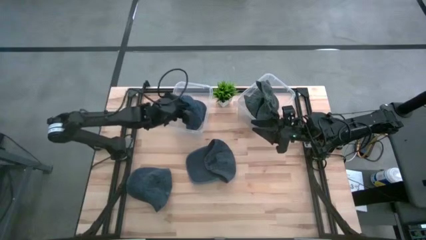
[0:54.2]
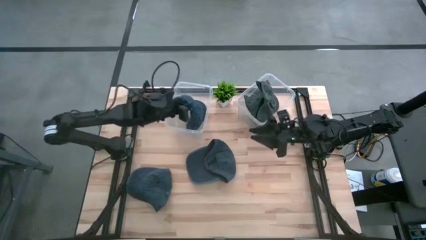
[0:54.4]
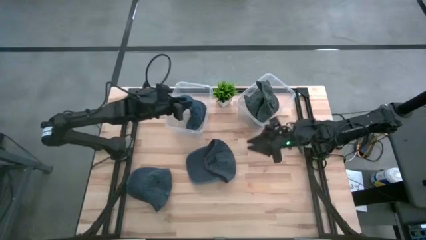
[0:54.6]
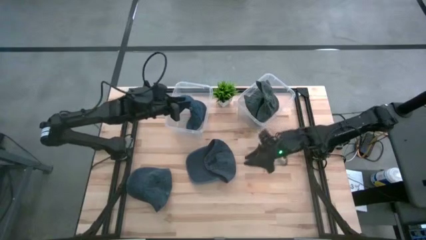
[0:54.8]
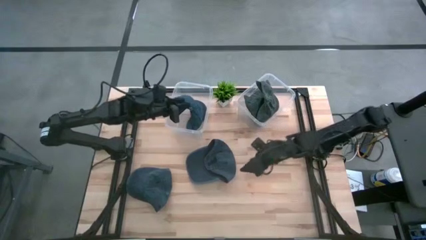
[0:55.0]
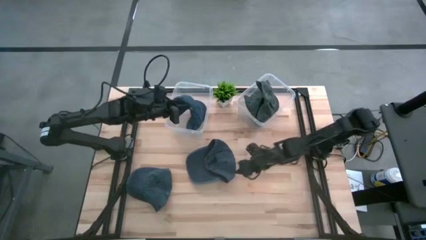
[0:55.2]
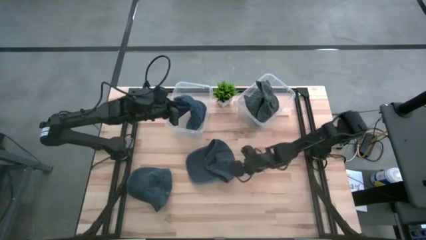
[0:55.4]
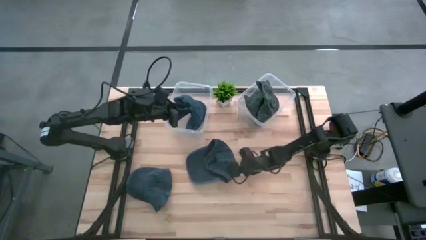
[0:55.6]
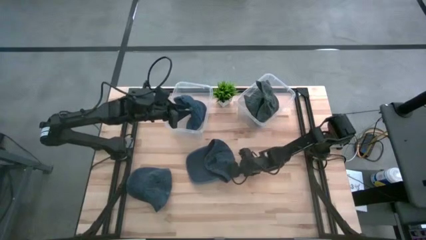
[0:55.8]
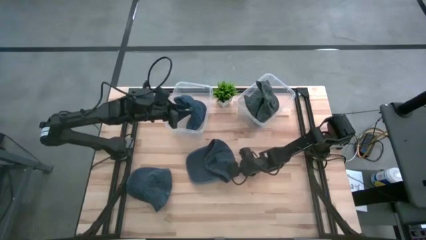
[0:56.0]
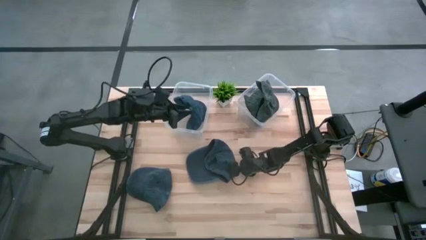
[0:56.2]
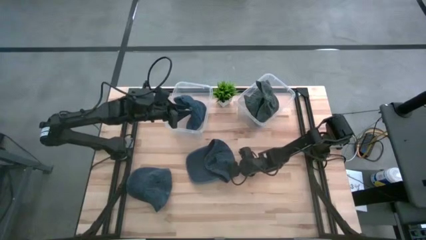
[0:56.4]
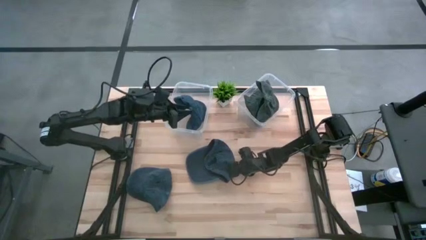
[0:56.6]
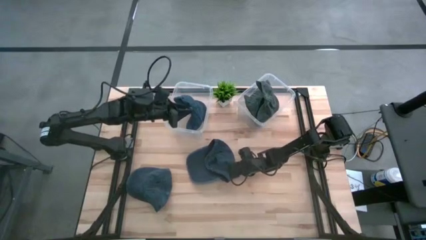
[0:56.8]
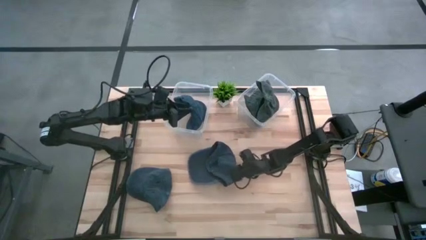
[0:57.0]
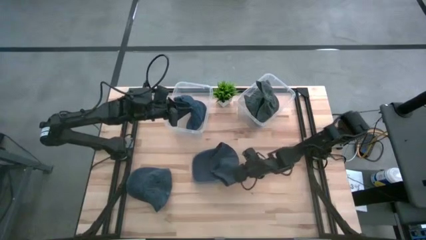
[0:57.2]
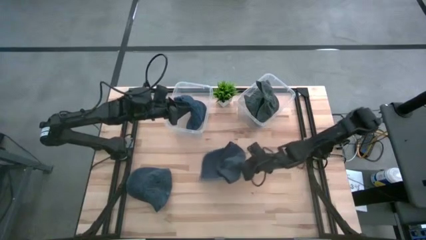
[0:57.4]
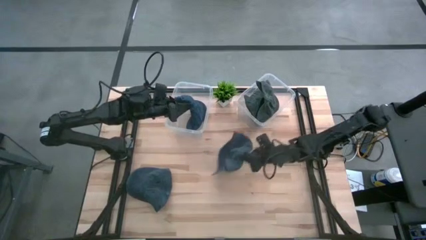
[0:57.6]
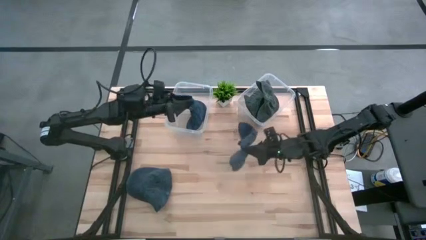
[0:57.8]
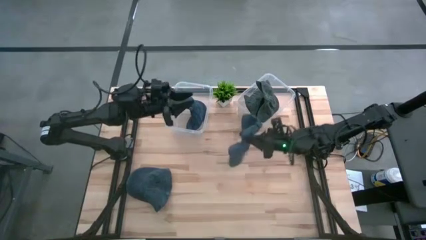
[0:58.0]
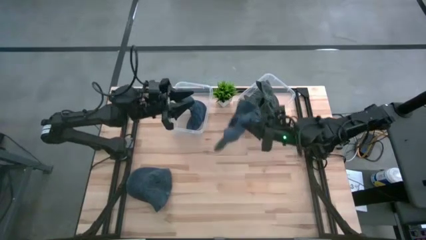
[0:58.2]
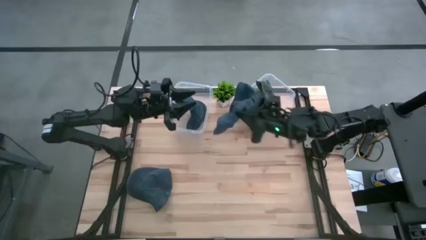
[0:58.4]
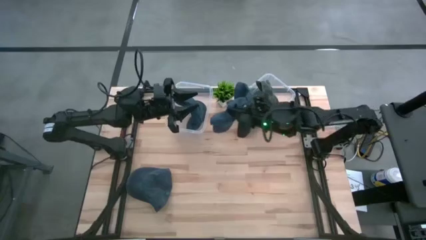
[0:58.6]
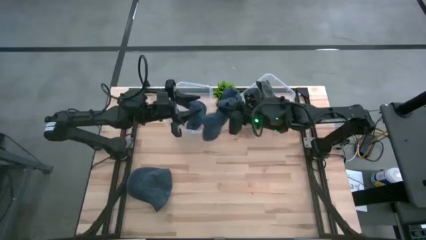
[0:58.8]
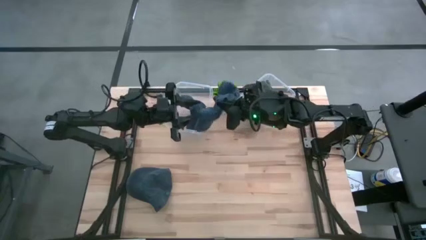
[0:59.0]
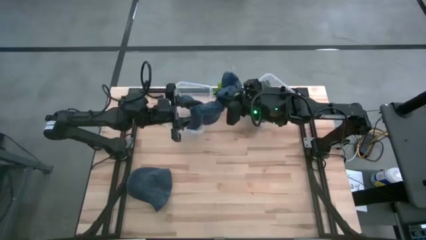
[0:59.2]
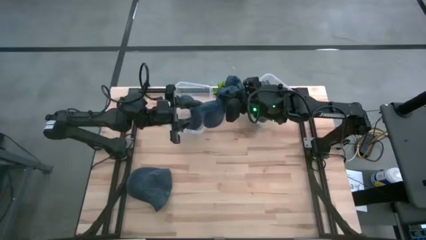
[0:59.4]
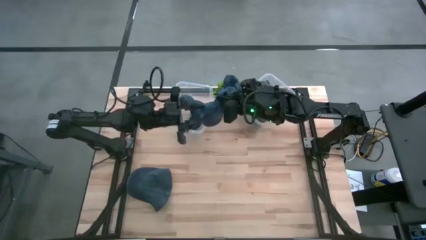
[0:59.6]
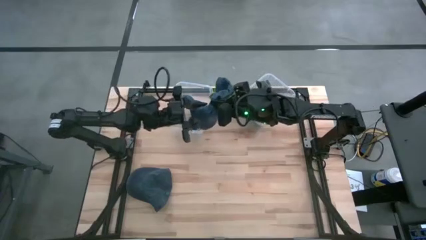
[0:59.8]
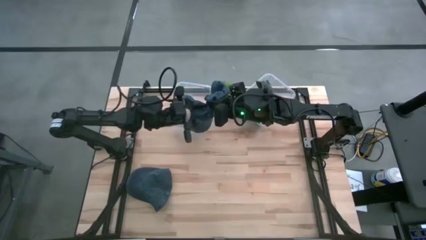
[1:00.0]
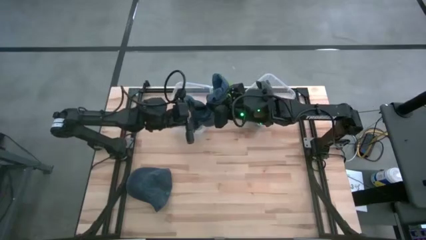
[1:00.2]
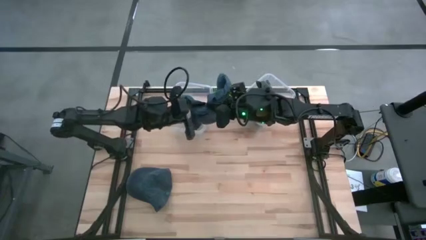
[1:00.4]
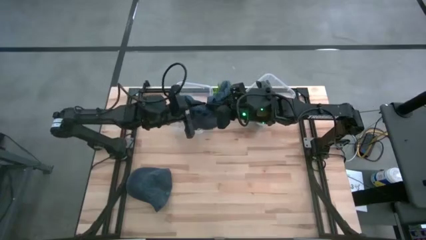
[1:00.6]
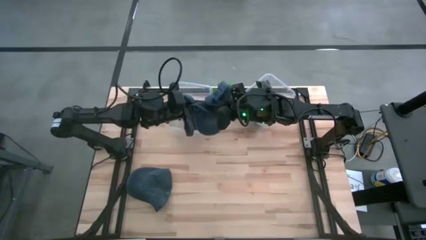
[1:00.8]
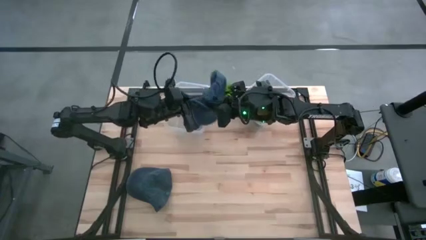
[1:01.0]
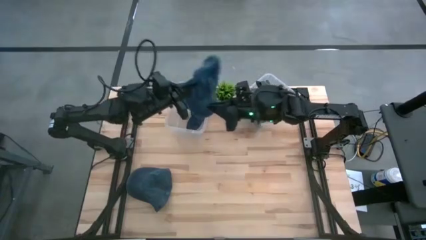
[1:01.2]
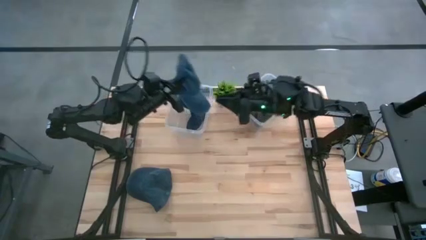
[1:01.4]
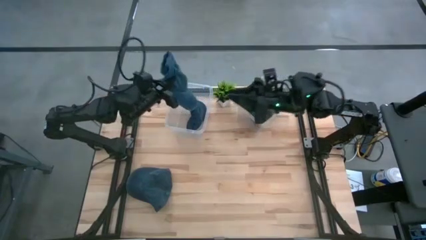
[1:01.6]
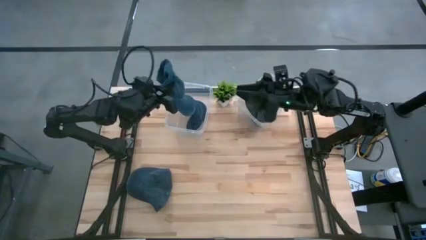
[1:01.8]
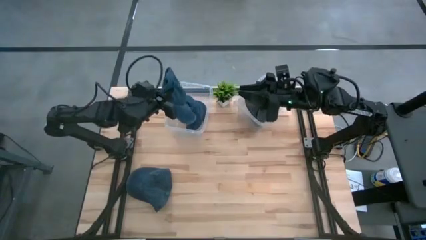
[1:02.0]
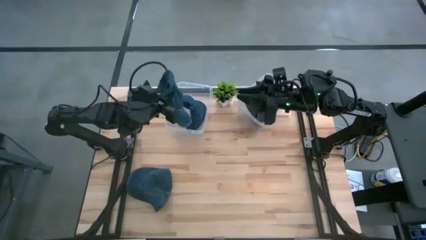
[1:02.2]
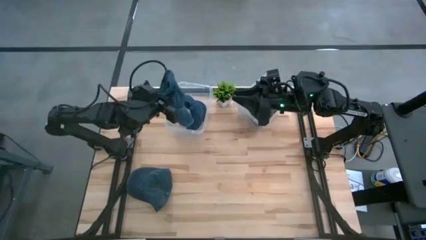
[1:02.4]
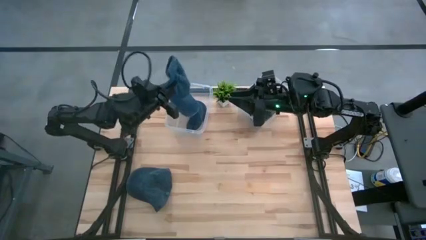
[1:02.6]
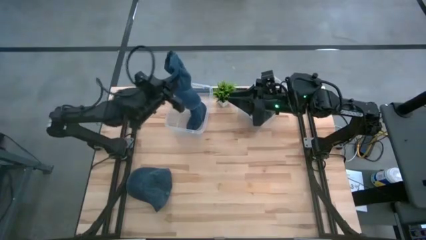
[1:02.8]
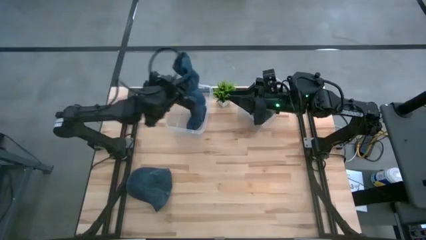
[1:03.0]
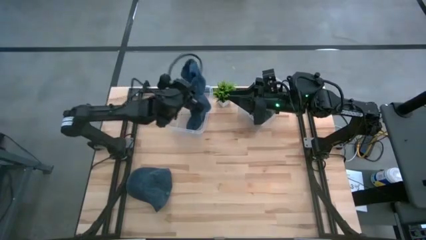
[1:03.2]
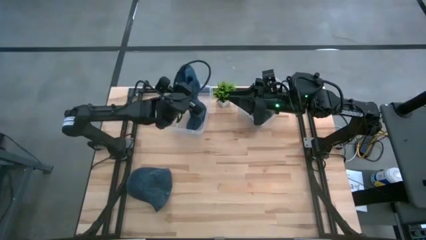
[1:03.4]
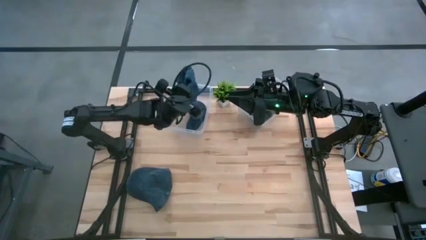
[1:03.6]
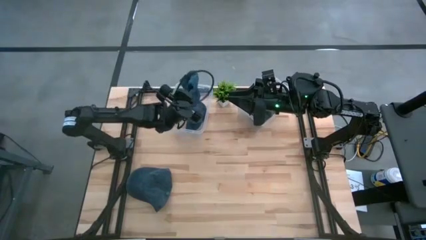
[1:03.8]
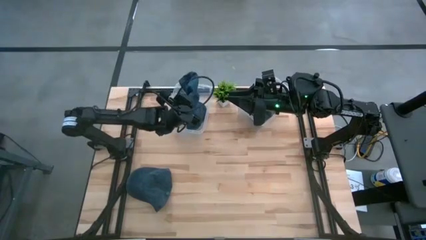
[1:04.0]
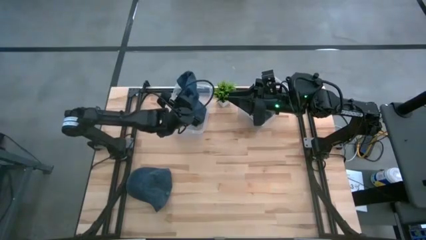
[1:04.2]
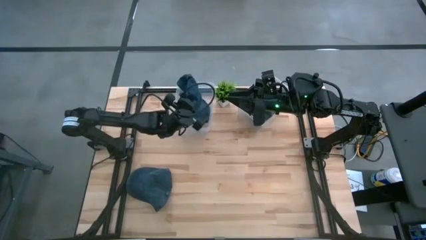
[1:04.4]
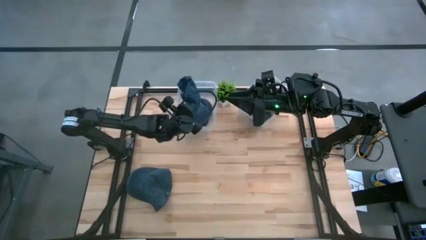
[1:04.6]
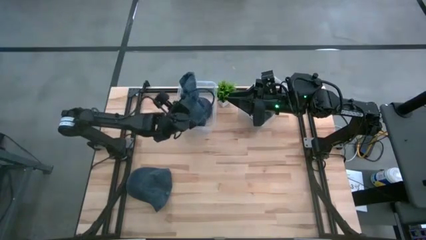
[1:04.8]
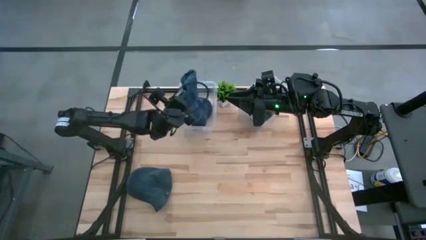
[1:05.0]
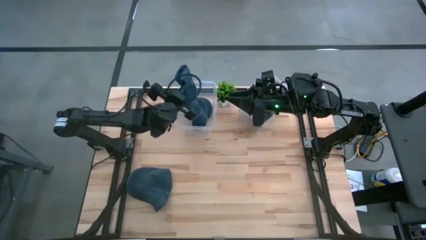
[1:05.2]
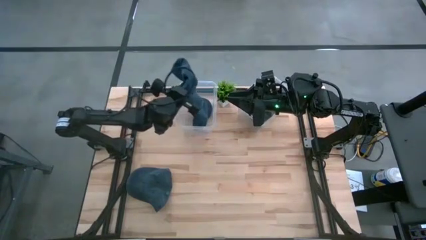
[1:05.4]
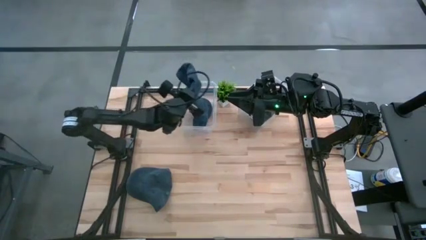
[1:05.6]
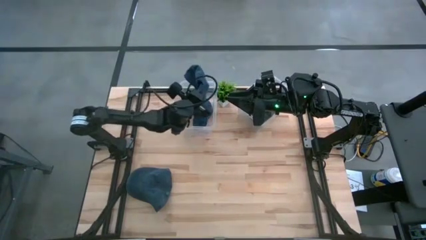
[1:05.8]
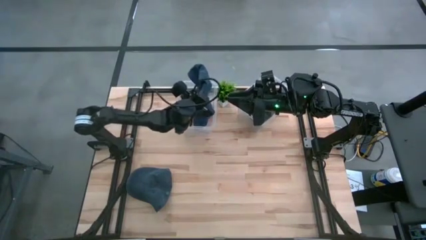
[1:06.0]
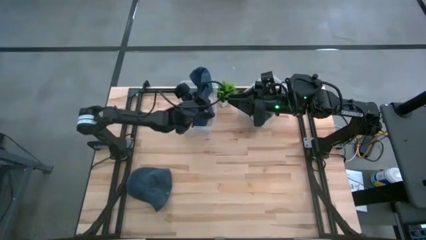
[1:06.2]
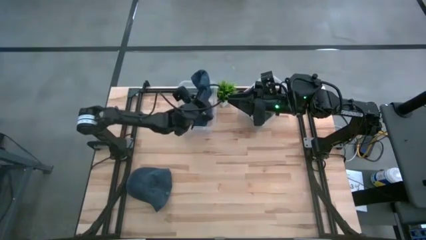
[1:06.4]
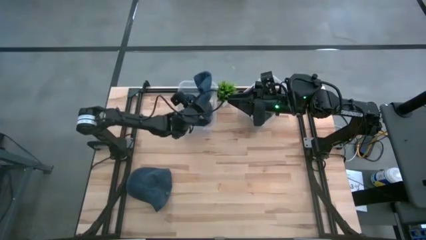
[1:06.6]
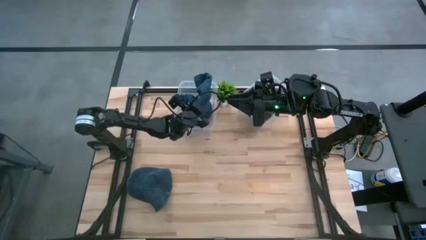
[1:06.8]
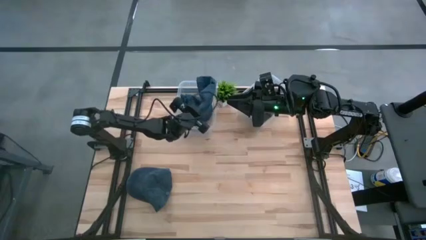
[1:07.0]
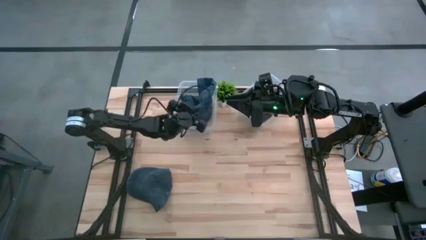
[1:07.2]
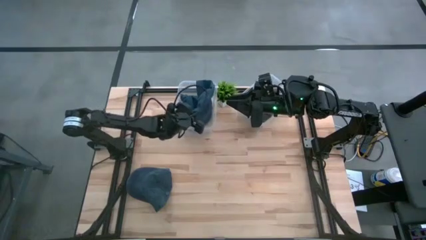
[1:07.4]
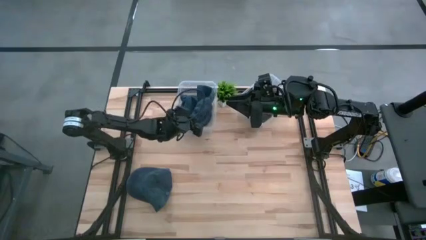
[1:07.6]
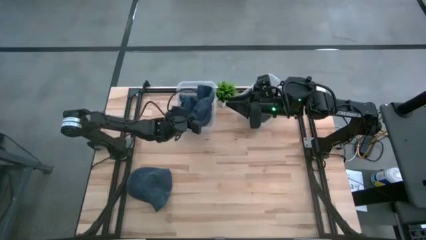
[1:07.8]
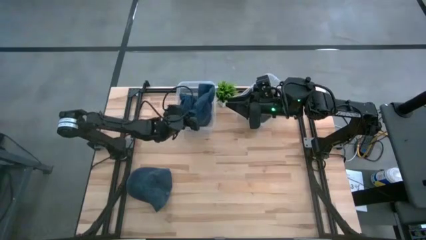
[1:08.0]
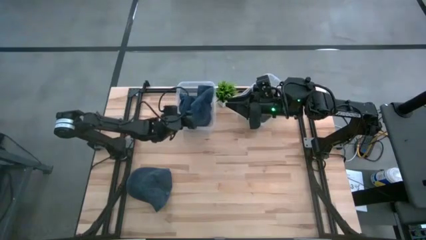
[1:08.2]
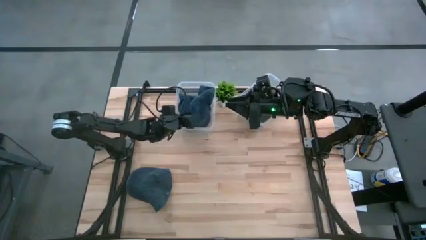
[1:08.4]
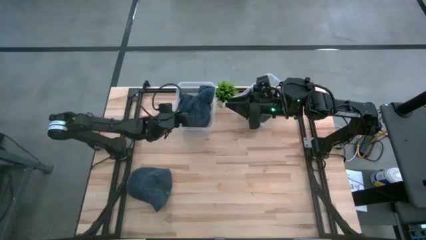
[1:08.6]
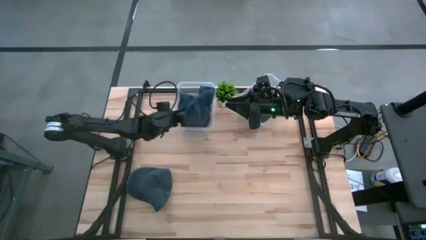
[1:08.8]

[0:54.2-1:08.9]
Task: Pick & Place hat
Put the right blue cap in the left transparent bin
